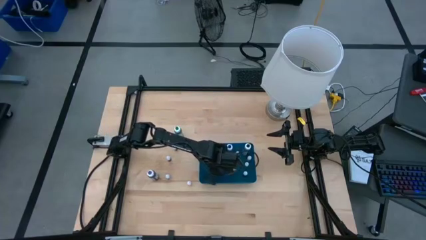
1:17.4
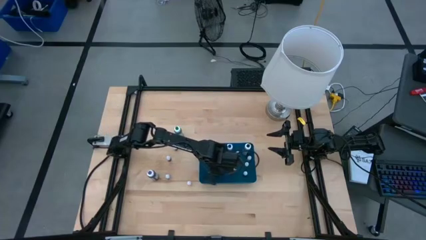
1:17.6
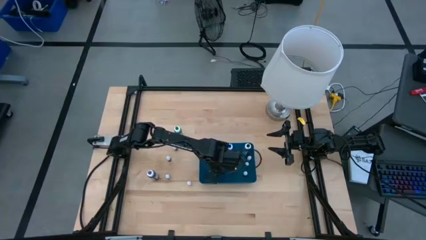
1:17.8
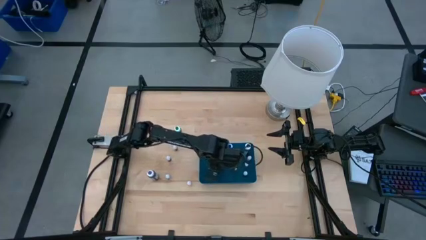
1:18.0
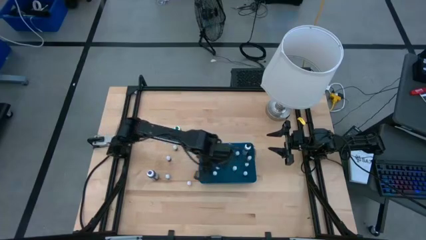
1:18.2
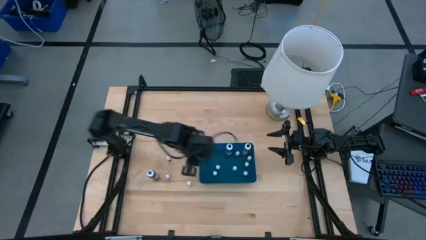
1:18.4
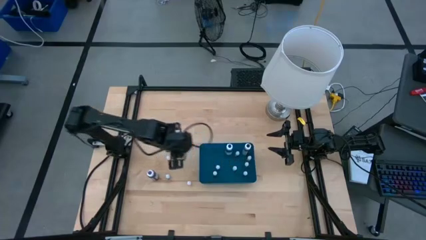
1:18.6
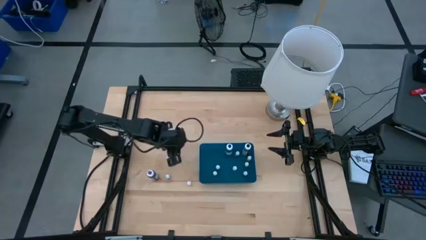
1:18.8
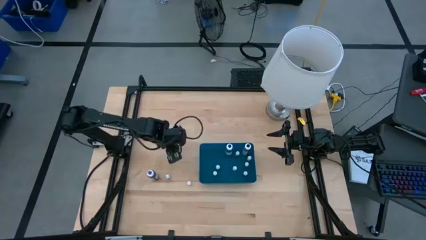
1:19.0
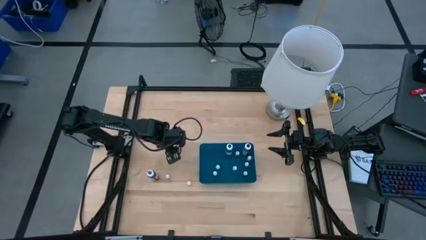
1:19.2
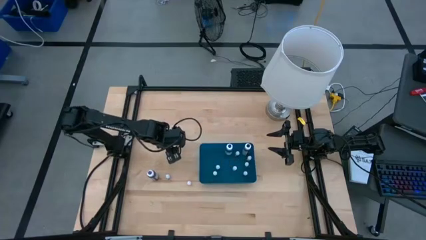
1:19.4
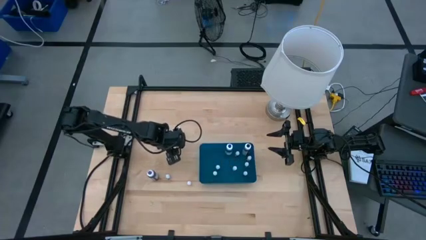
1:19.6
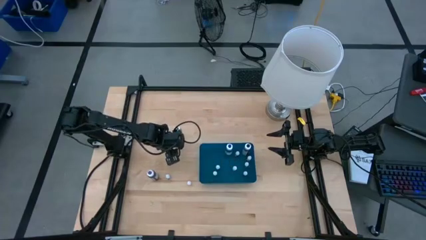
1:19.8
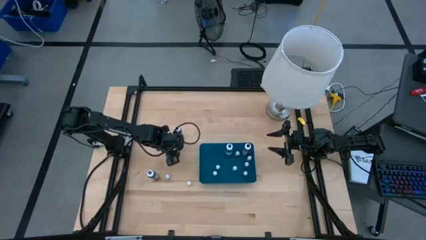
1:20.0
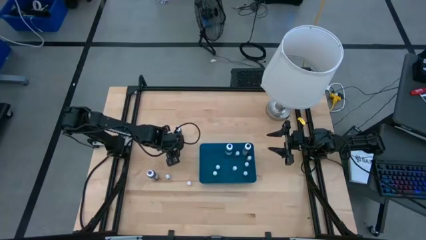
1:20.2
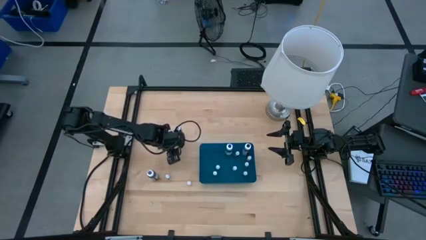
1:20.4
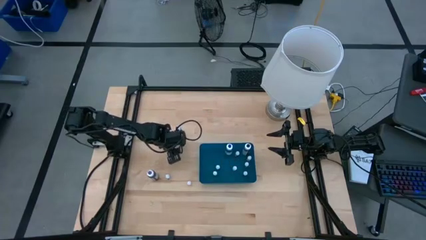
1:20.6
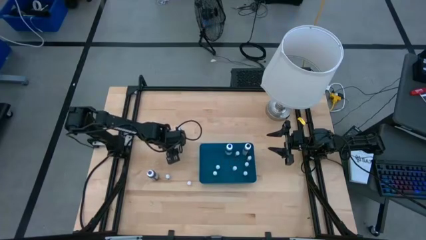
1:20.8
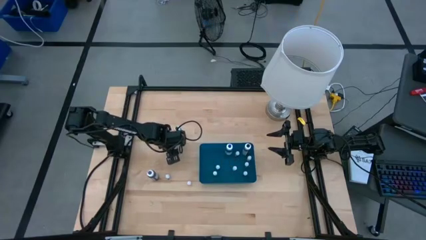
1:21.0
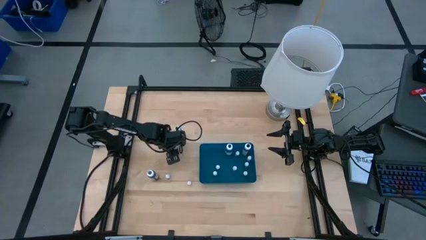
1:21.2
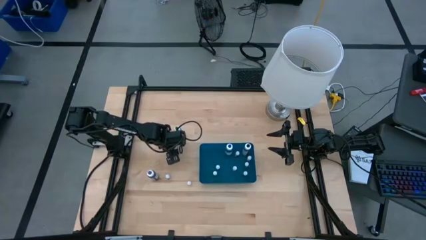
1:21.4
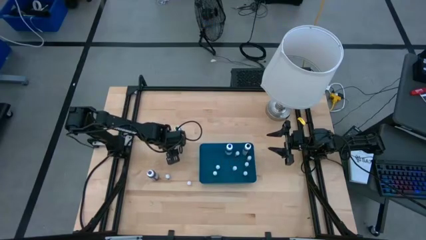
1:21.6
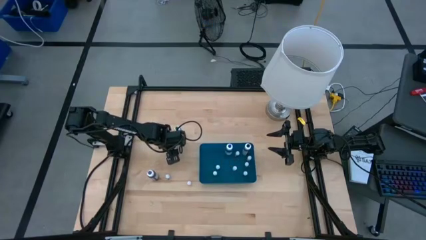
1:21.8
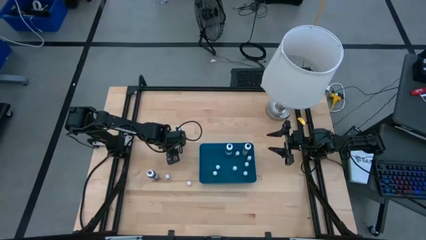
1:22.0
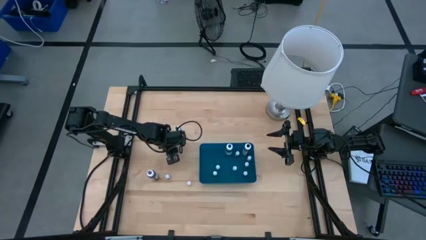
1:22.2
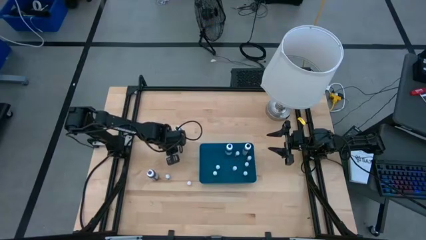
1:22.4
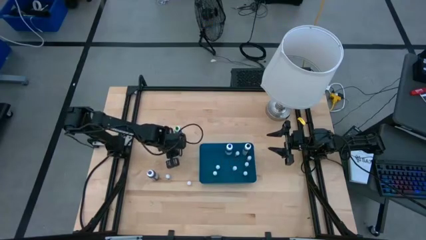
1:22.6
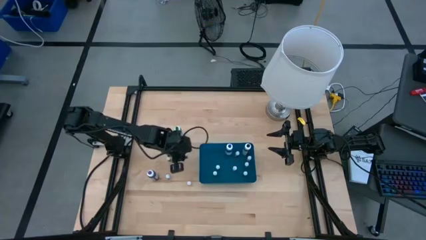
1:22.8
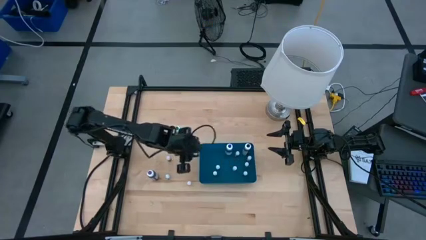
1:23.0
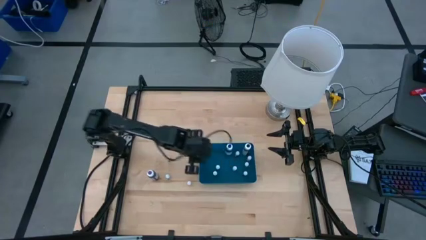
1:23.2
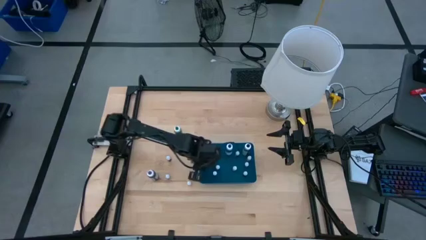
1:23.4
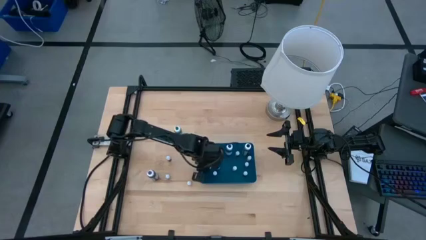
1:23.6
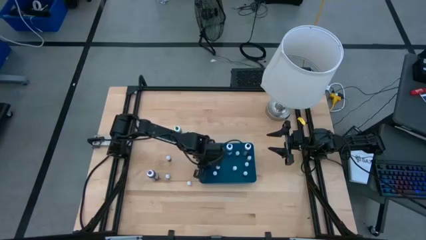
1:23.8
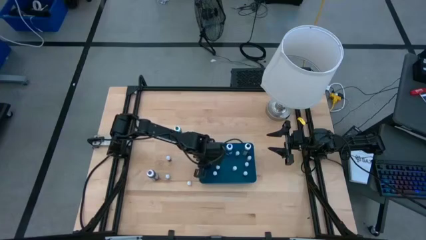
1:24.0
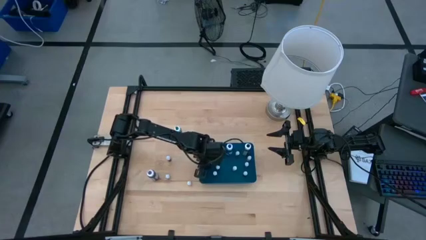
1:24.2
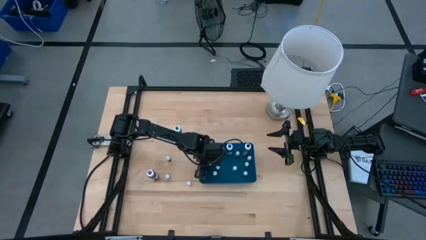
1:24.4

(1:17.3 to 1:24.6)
Task: Pick & Place food coloring
Put the small black food coloring bottle into the blue bin

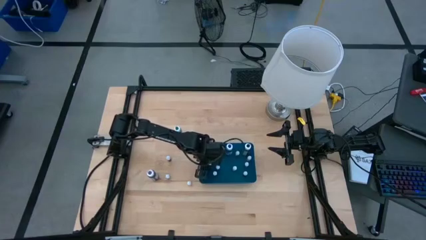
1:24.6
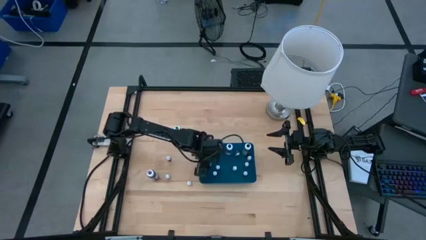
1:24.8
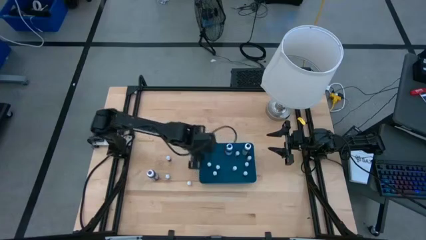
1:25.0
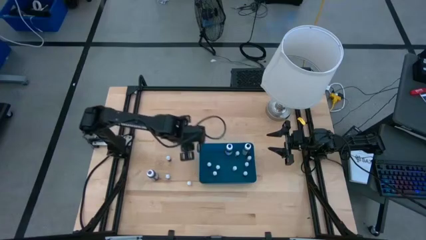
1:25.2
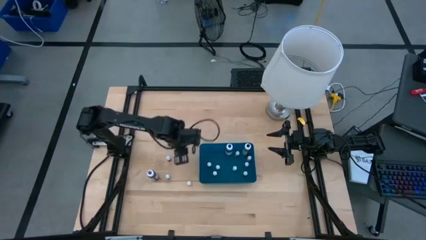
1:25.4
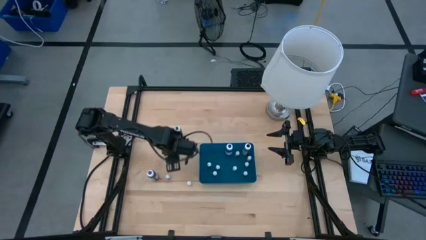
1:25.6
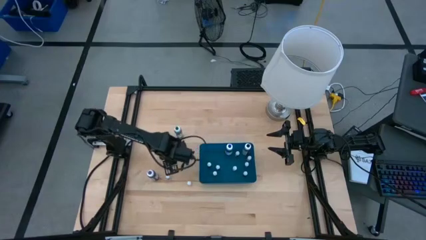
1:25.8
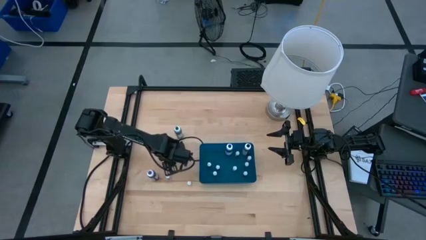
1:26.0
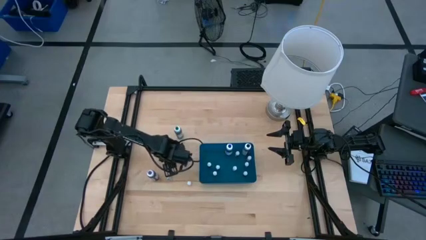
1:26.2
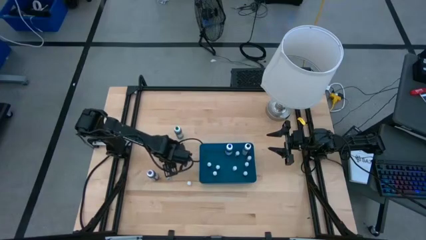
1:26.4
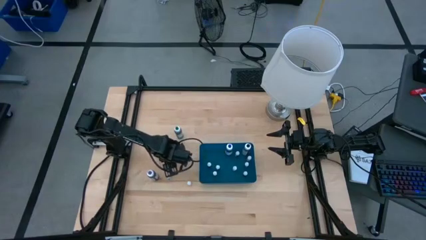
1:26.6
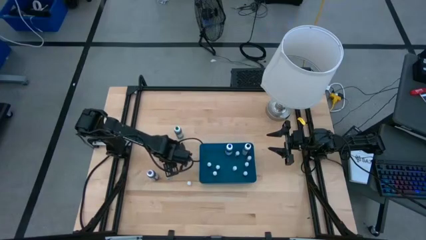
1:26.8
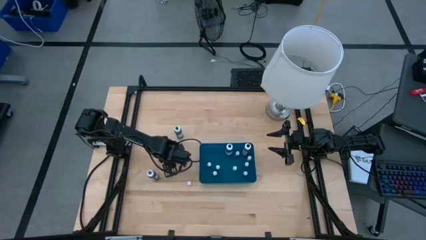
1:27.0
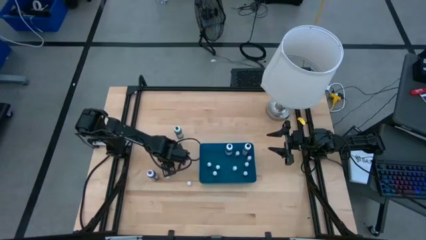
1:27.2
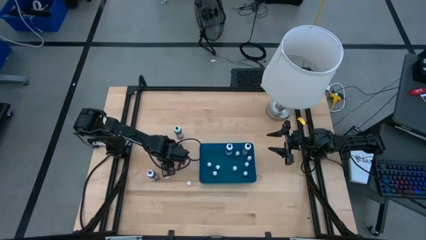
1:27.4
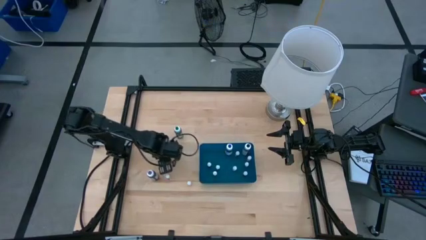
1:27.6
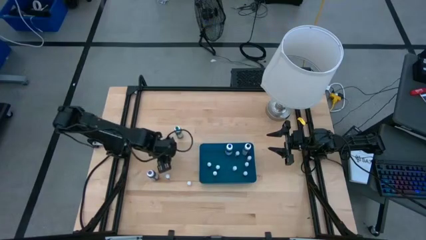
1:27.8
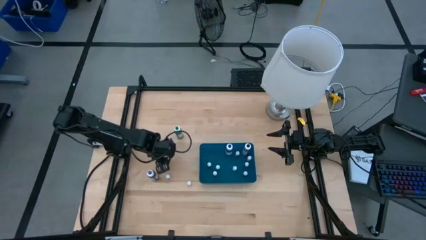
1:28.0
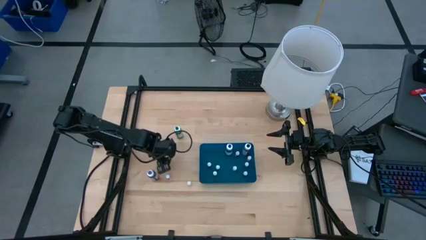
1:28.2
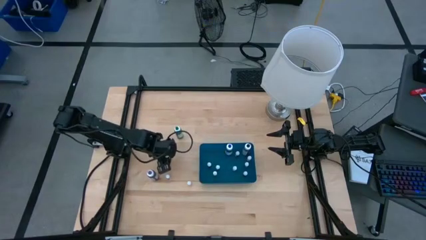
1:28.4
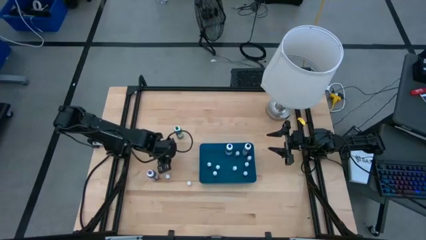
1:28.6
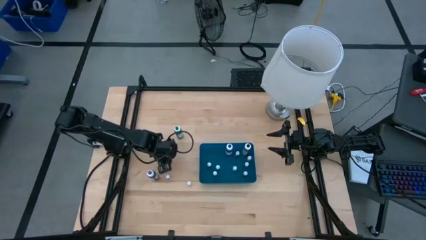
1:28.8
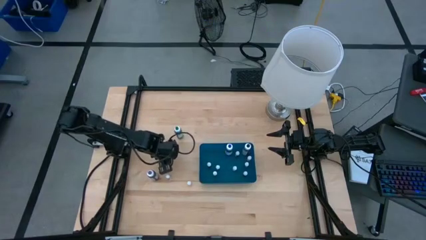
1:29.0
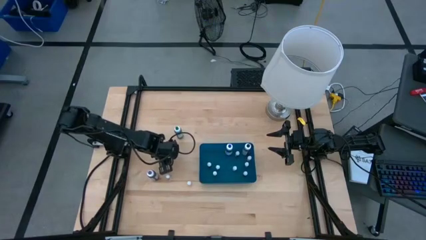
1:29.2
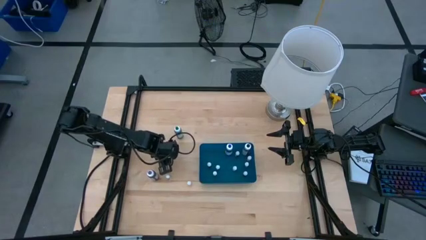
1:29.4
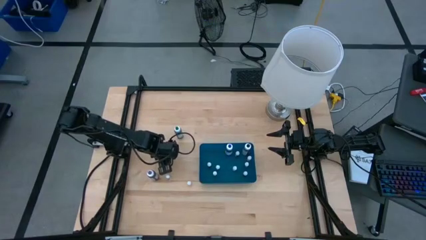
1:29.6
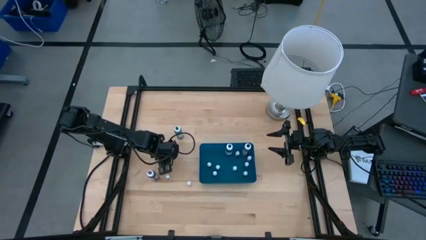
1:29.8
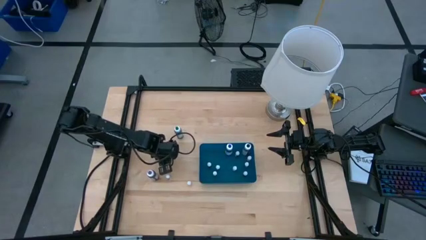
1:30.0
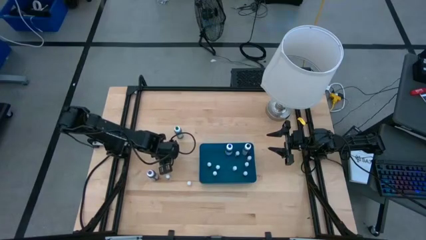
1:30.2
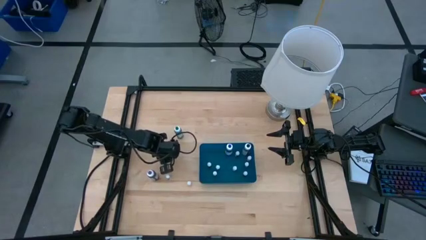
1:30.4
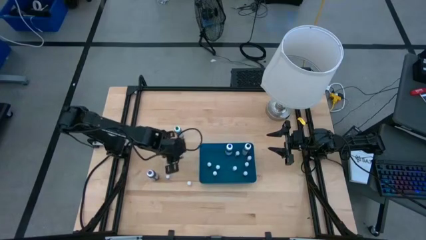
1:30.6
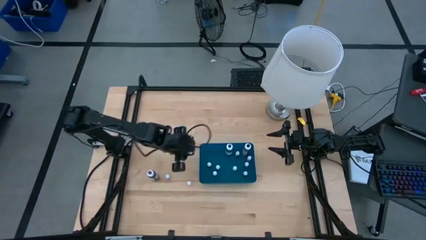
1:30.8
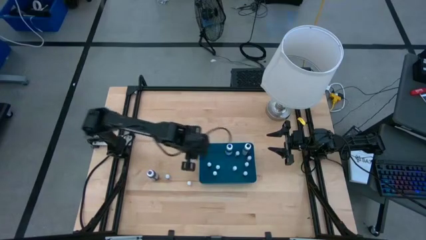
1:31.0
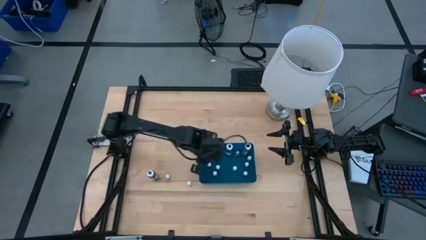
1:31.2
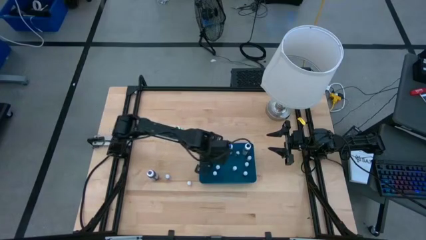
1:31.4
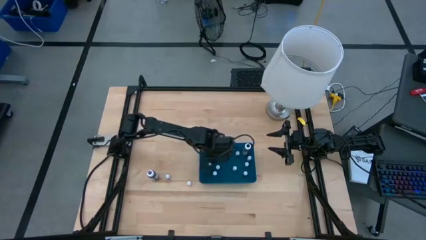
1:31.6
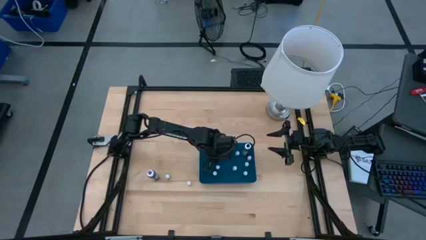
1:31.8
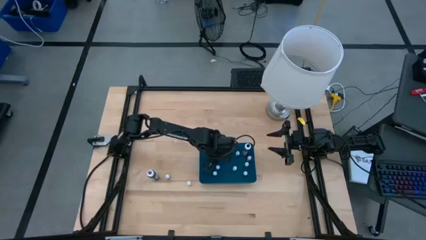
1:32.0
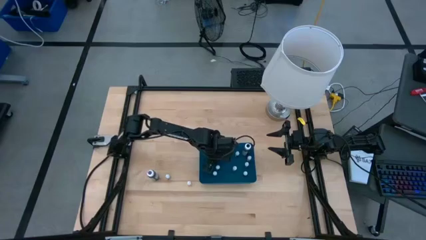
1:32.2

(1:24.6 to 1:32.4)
Put the small violet food coloring bottle into the blue bin
